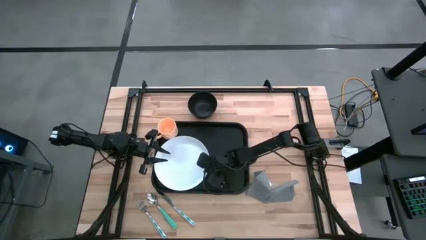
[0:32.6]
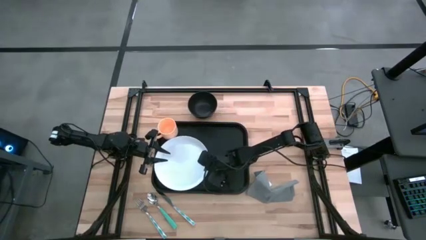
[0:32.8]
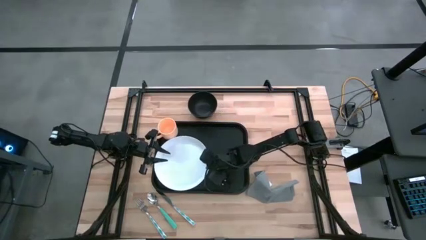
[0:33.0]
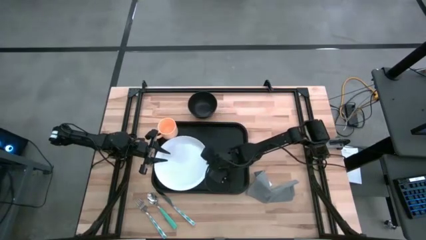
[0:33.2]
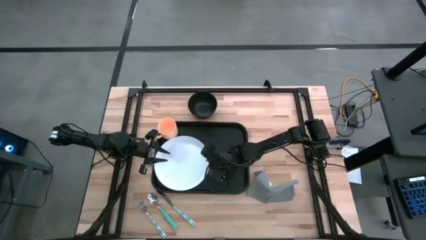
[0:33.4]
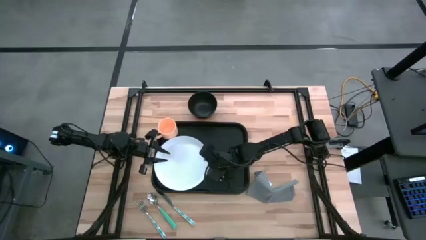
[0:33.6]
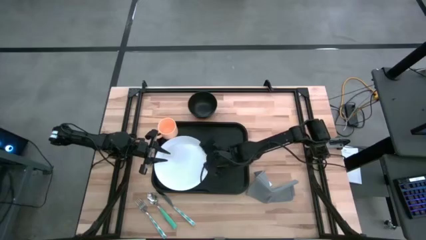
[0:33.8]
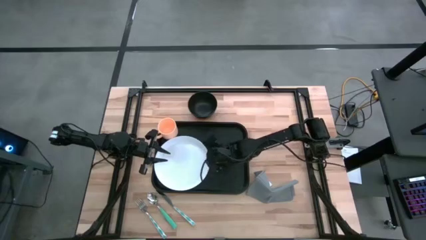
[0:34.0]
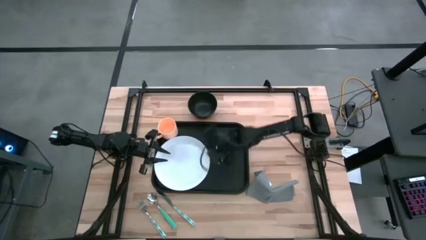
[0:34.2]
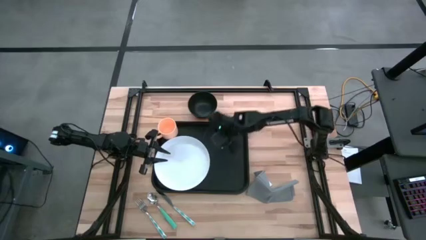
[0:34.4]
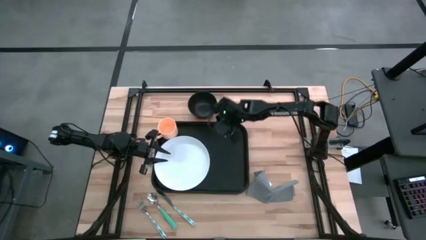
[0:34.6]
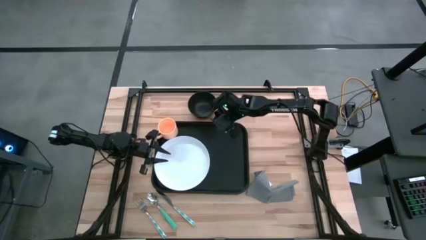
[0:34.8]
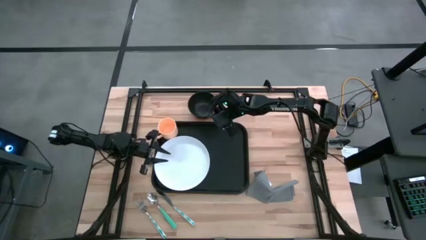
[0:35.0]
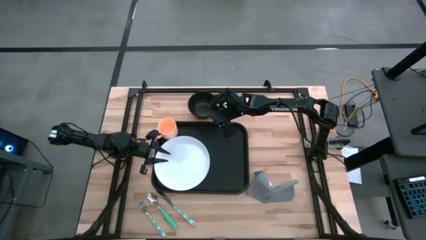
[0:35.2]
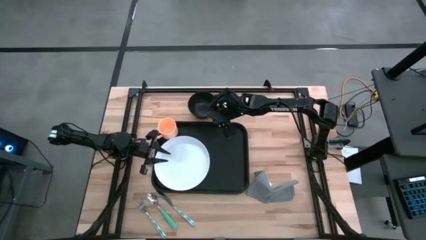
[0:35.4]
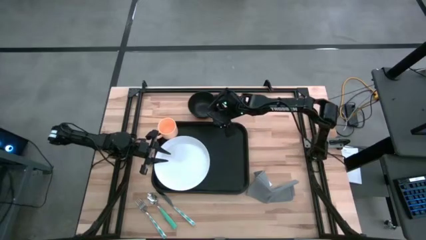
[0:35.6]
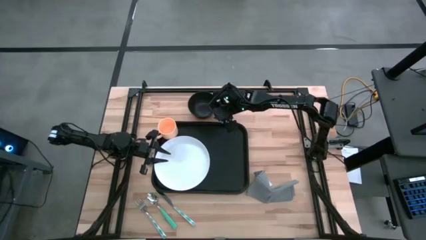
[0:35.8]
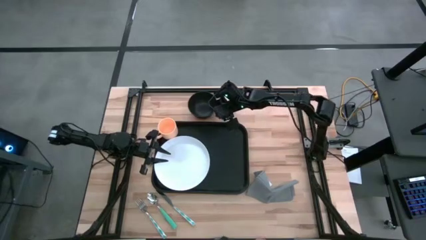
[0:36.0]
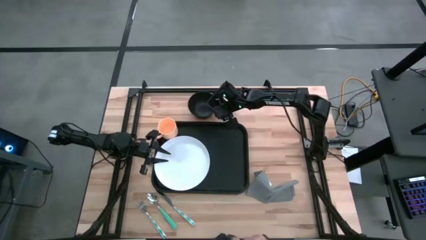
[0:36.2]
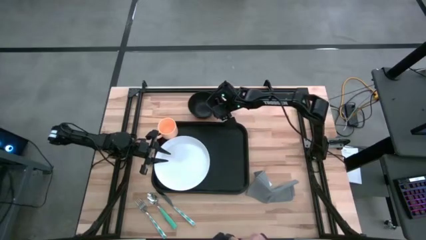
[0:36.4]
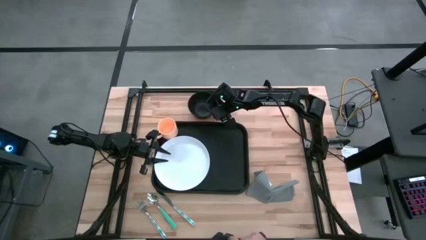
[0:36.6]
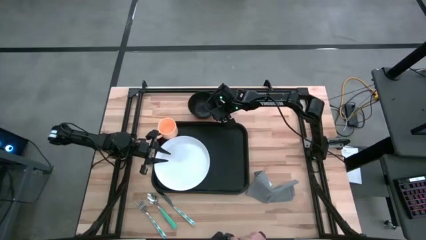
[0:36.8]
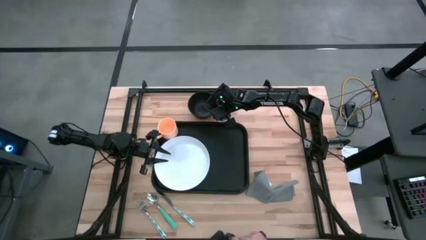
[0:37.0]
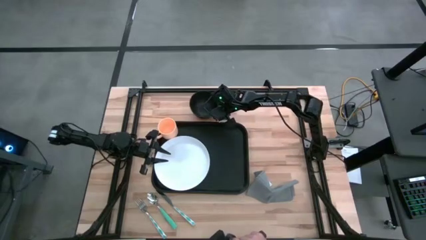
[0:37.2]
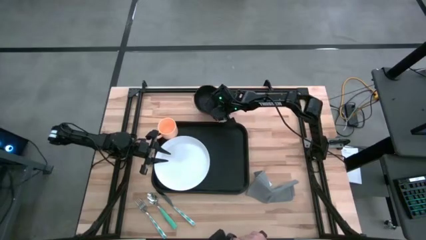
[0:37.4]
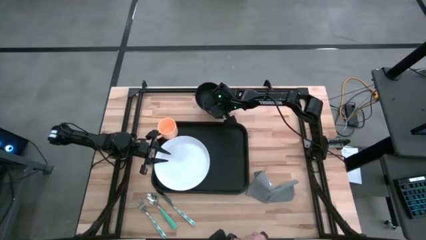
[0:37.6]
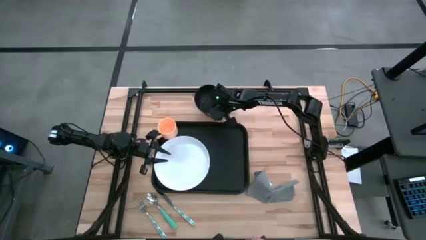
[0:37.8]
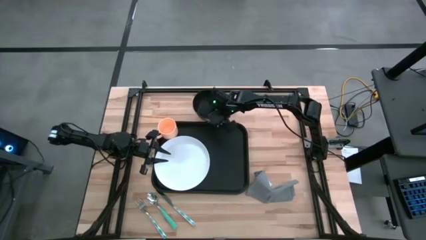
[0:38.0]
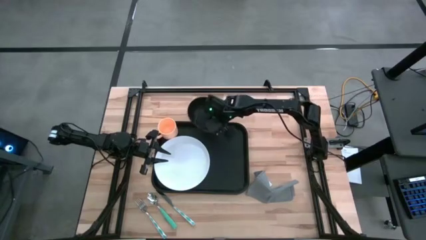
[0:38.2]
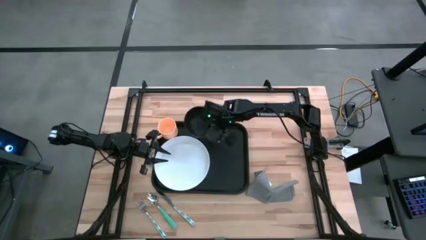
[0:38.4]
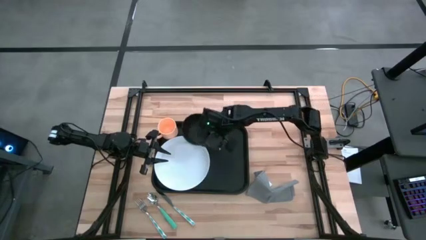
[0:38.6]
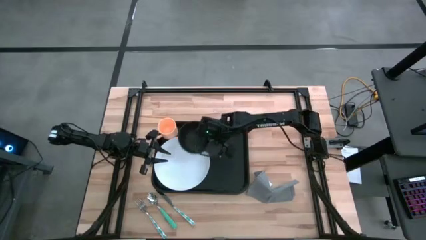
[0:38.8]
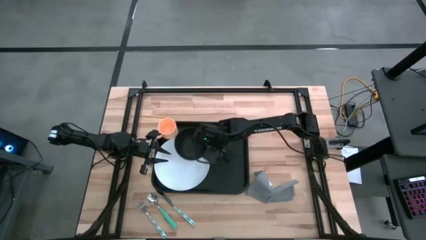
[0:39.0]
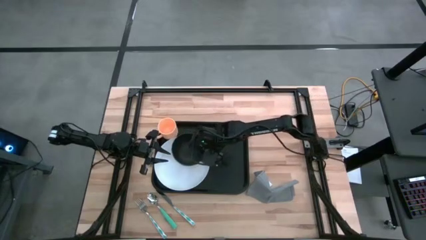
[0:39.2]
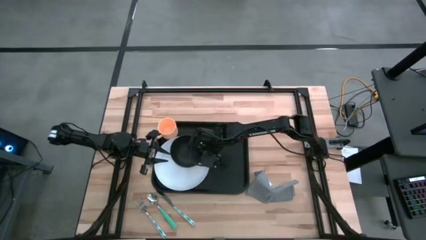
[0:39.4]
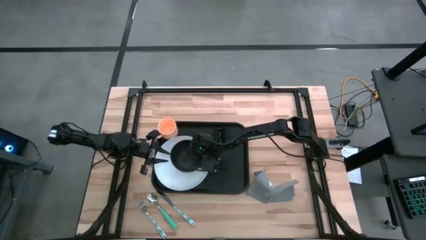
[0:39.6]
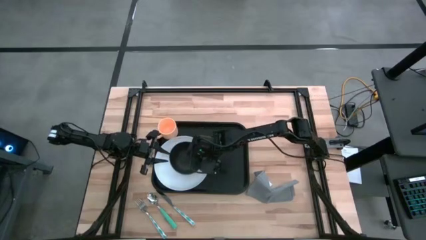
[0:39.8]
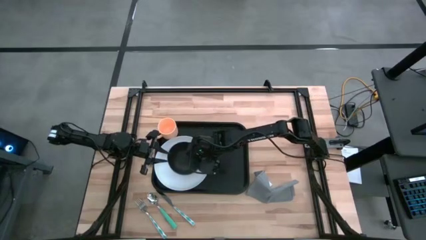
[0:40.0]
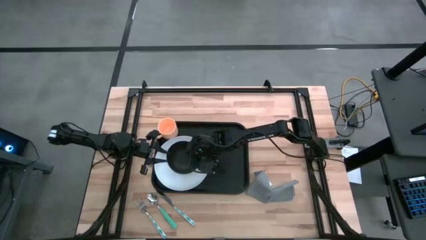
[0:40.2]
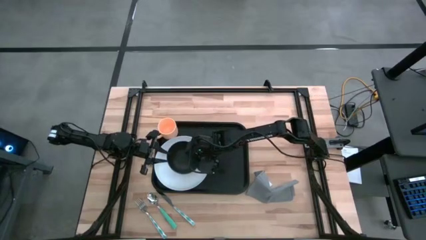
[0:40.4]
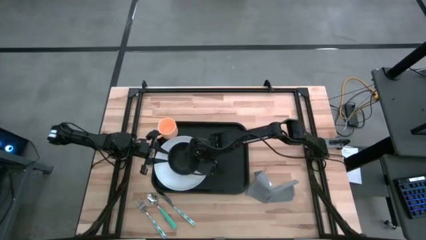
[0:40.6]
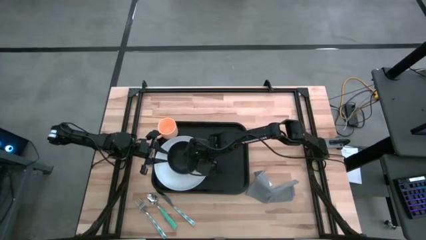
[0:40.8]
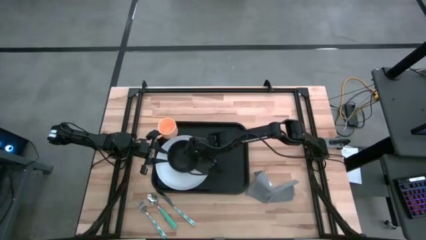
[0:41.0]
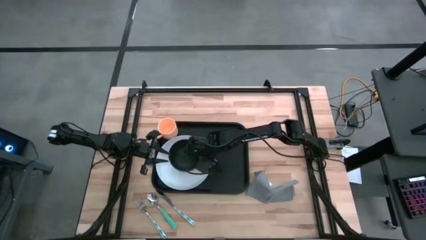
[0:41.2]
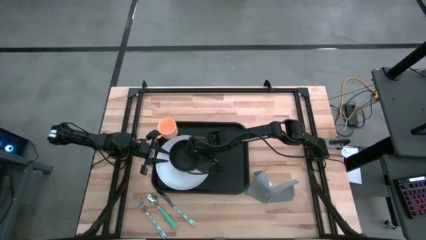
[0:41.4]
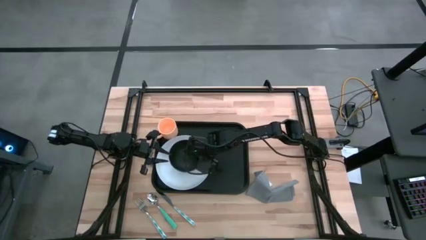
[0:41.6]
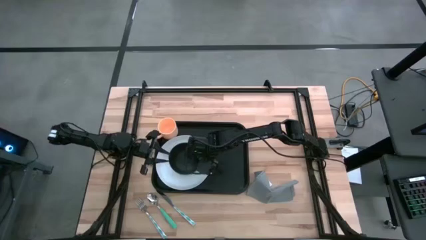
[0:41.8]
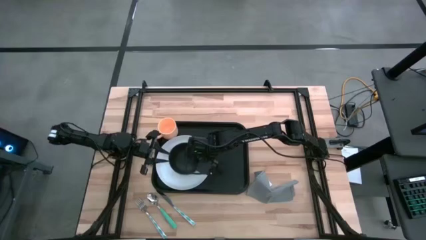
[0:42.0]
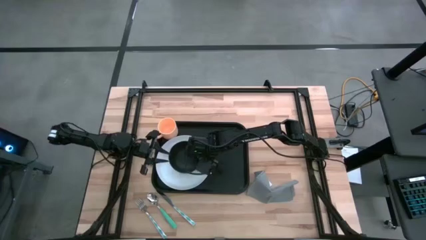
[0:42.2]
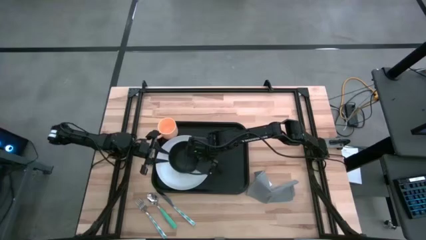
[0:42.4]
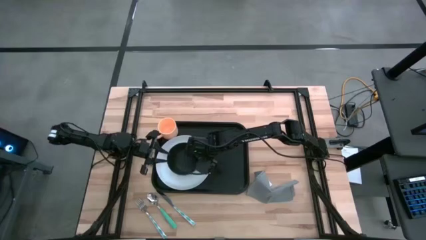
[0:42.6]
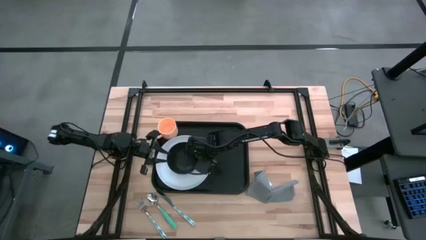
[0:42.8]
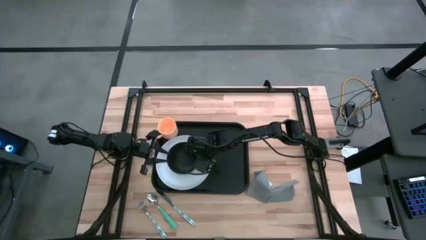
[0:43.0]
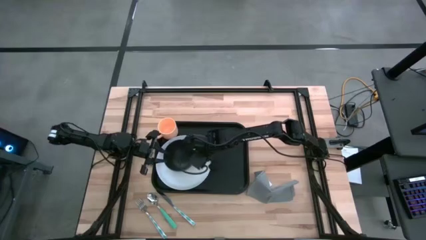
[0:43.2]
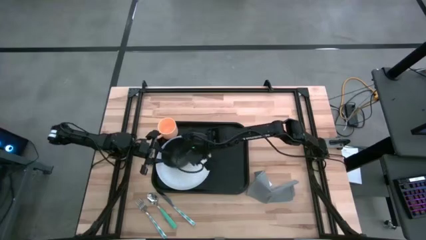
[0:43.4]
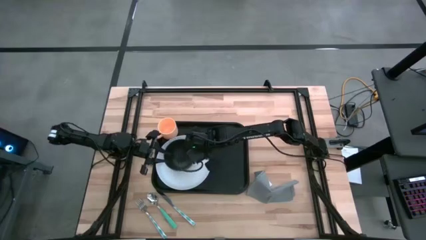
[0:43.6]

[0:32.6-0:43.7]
Task: Set up tray
Put the black bowl on the white plate

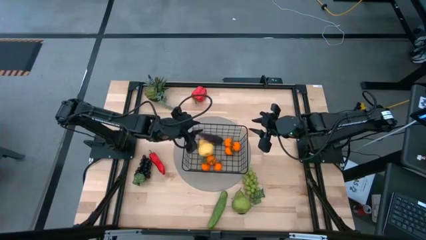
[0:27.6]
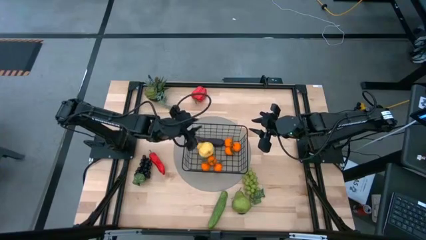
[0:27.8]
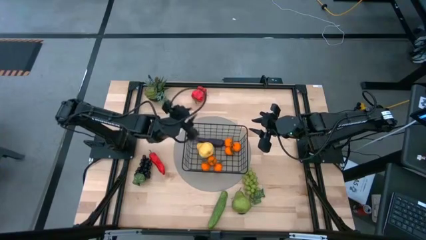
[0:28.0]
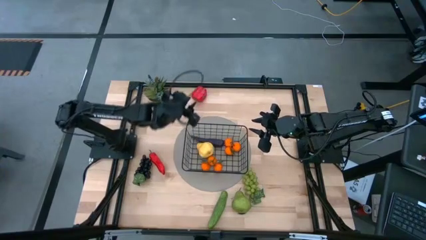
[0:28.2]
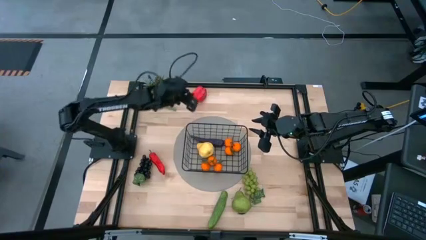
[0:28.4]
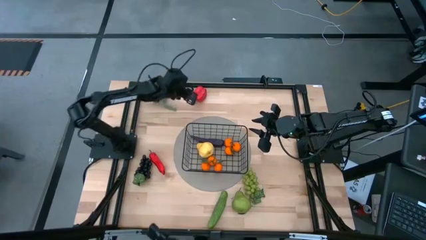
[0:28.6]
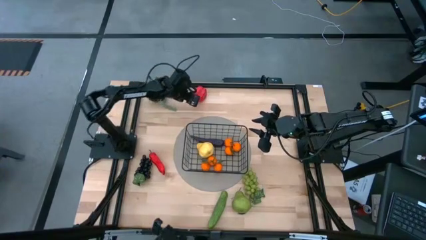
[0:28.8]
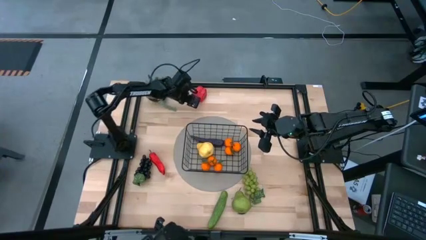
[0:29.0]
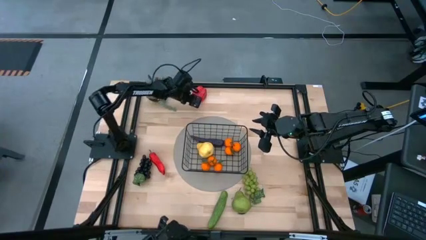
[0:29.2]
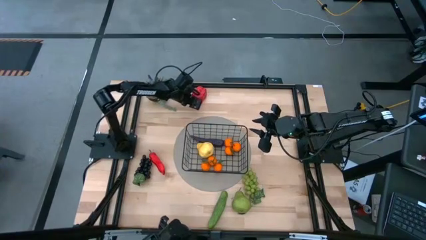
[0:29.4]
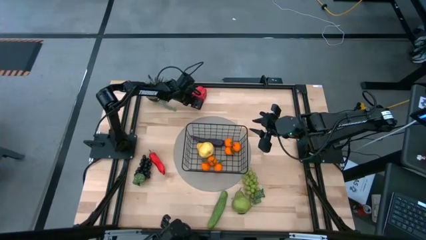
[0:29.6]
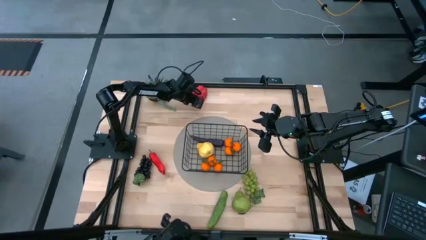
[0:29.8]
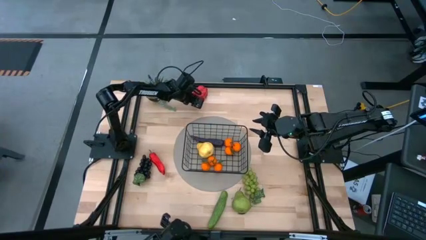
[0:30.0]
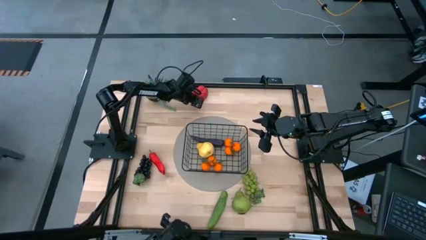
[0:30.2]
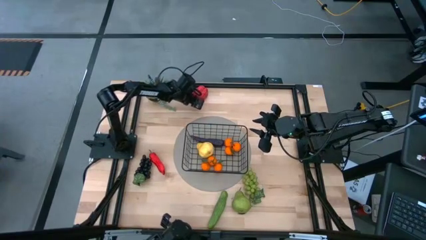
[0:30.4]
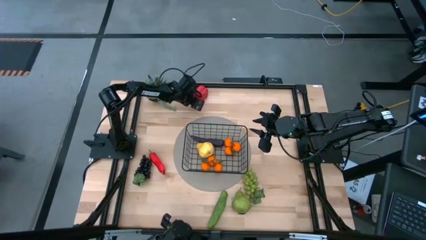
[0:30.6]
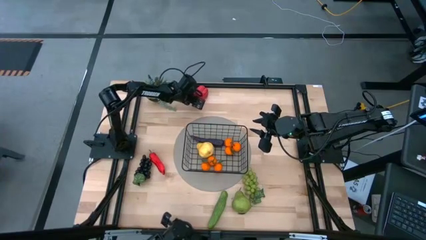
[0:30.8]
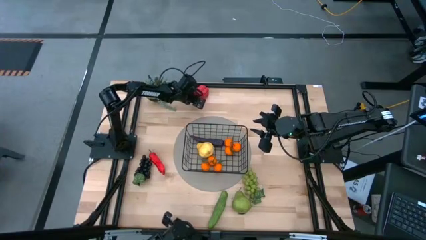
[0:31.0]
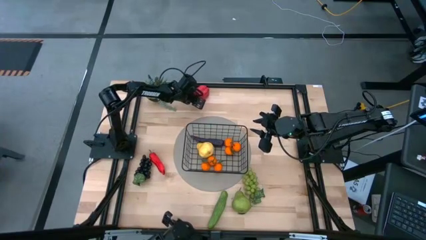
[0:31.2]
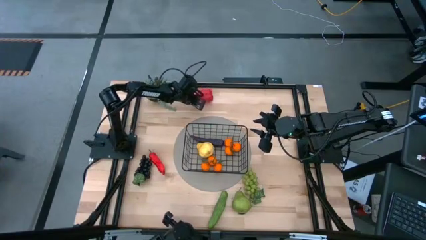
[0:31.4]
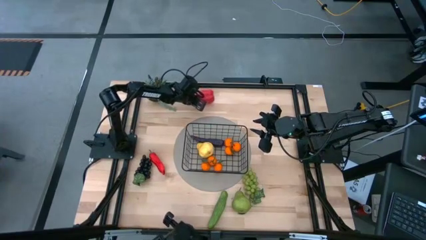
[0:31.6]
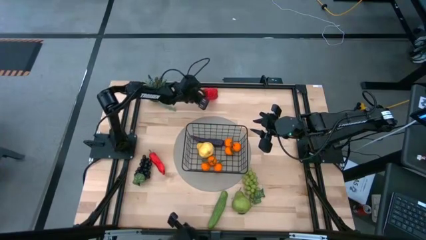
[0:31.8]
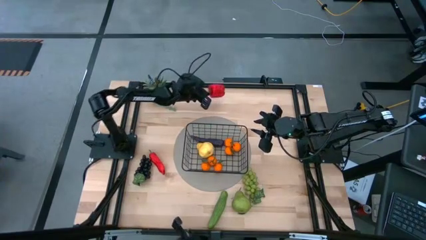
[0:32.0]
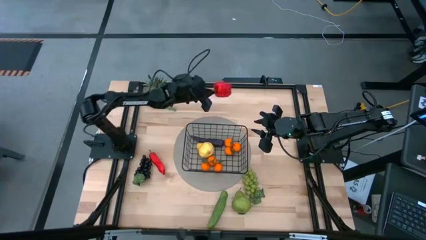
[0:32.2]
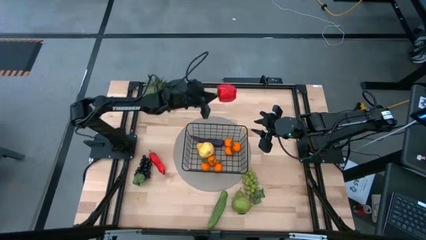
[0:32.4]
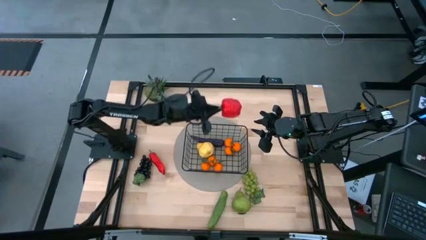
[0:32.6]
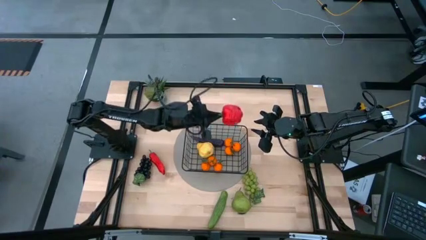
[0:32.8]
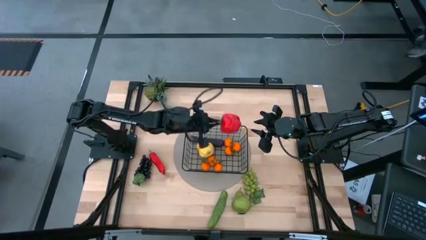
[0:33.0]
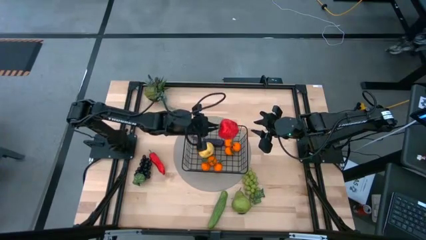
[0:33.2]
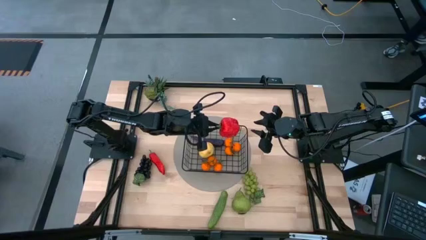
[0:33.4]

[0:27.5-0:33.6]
Task: Build produce basket
Put the red bell pepper into the black wire basket
